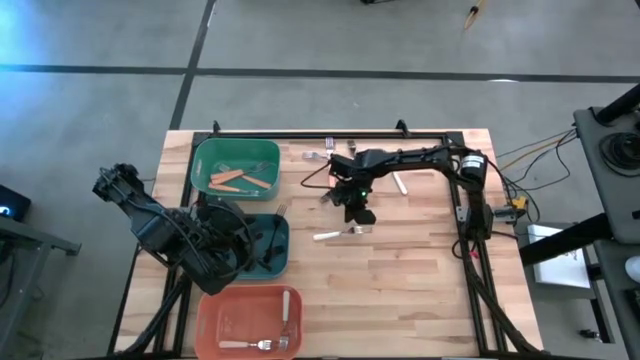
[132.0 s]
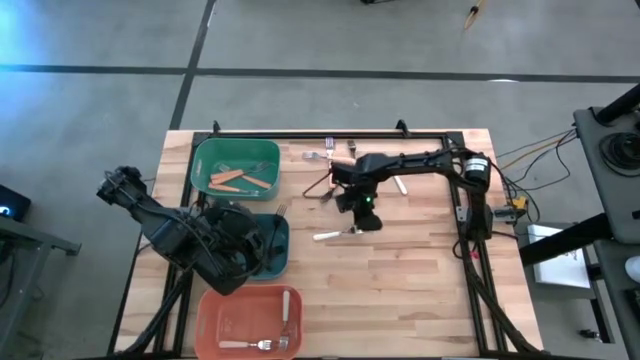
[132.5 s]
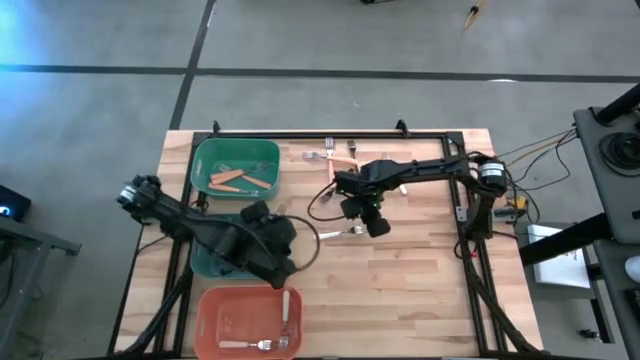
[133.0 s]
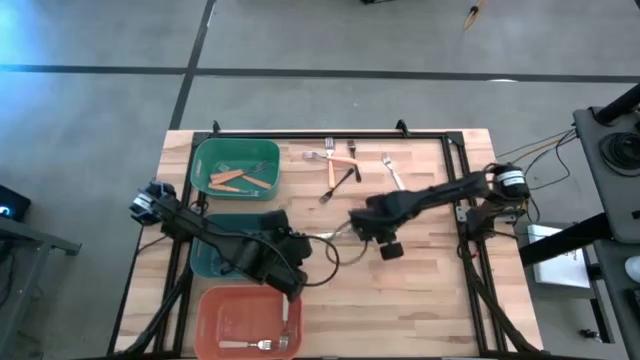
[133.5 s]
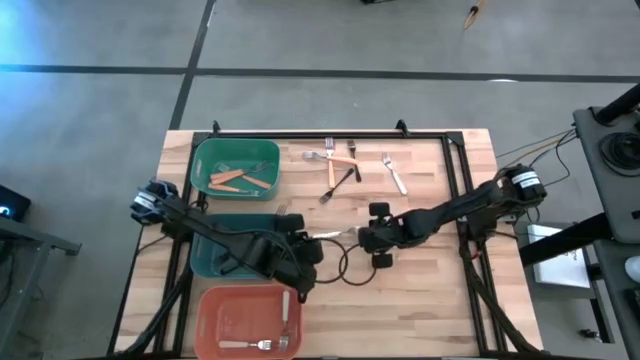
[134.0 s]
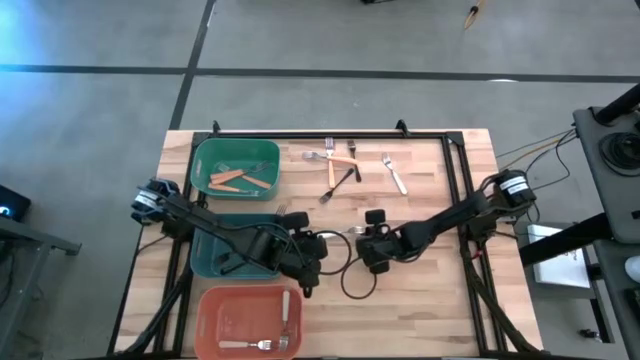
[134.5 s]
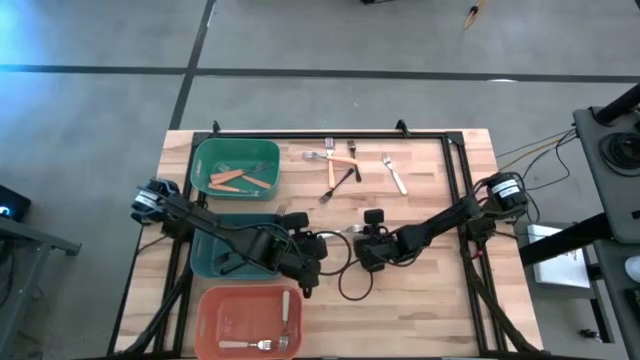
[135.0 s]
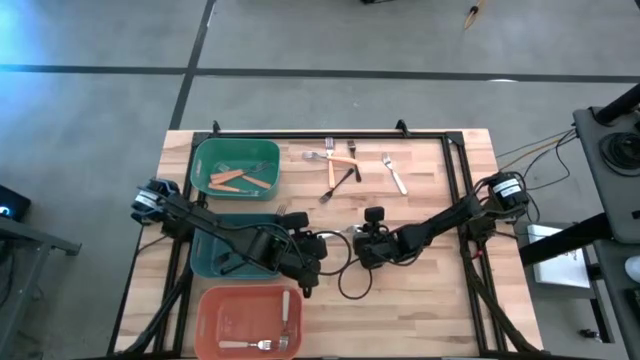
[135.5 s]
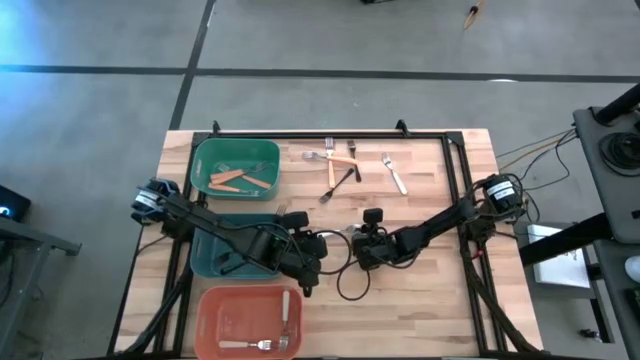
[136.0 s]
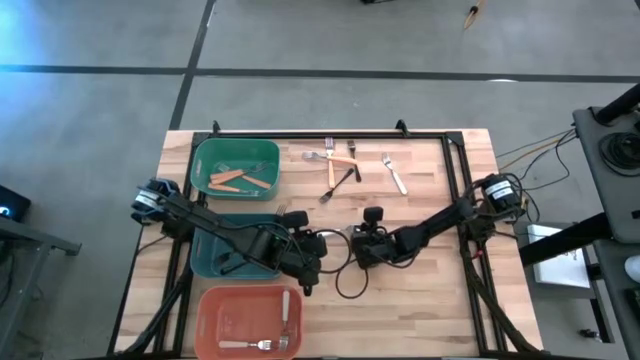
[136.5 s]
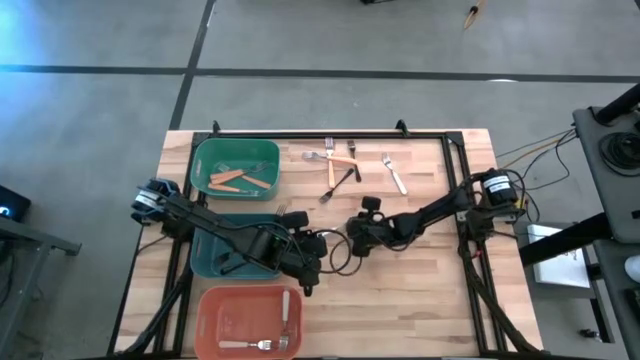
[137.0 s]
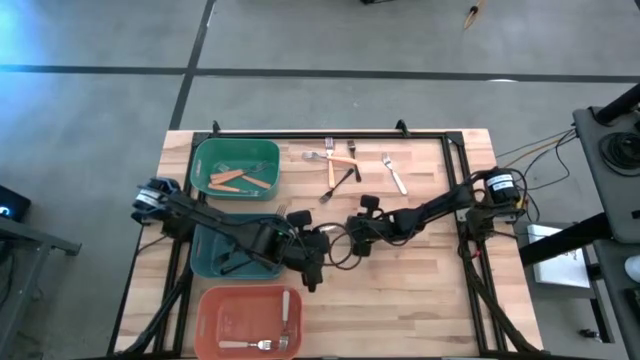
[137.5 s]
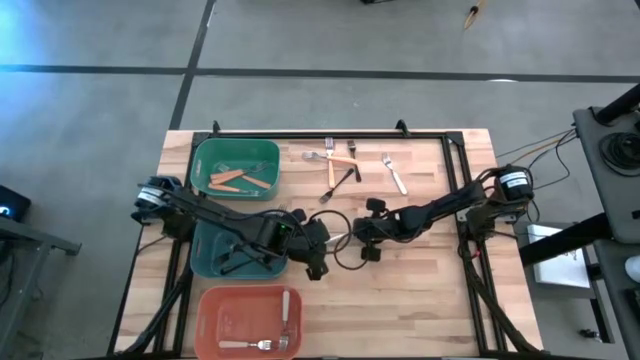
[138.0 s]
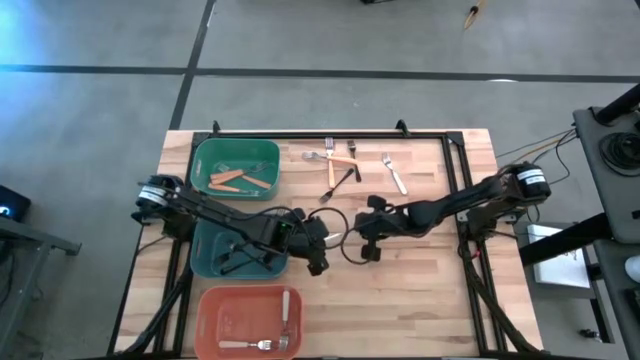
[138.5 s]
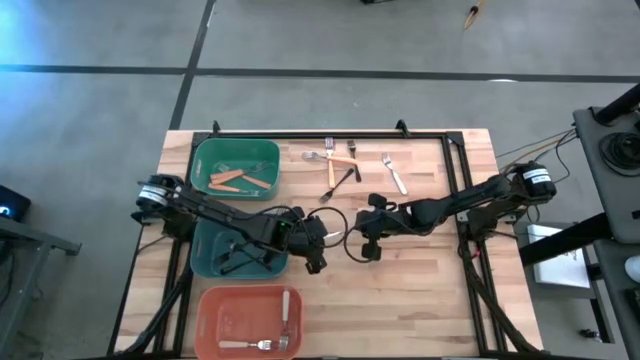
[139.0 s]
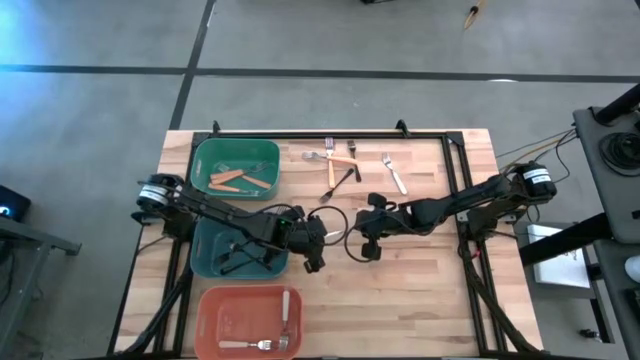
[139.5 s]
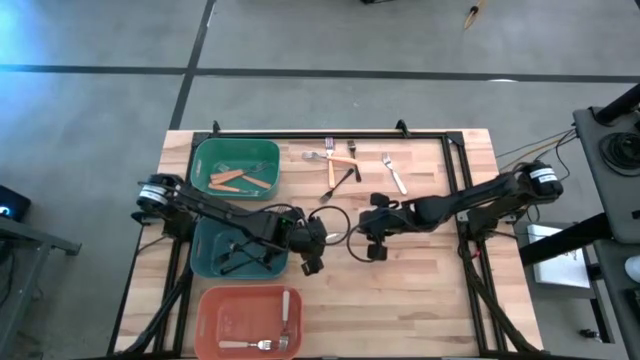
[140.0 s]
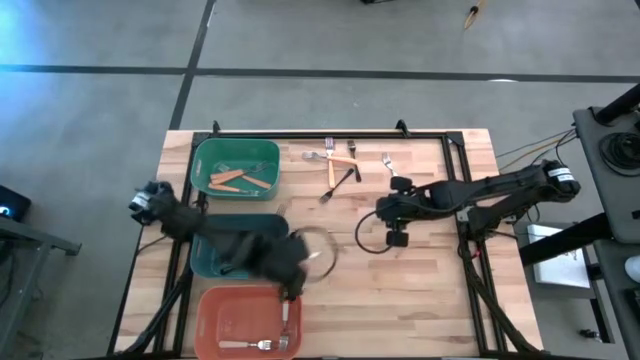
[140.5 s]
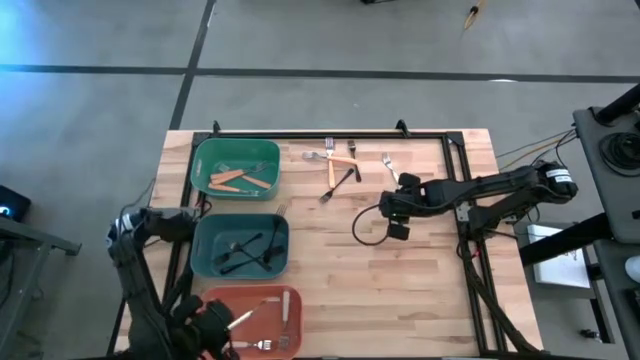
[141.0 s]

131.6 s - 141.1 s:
Task: Sort silverware by color (type)
Put the white fork into the orange bin

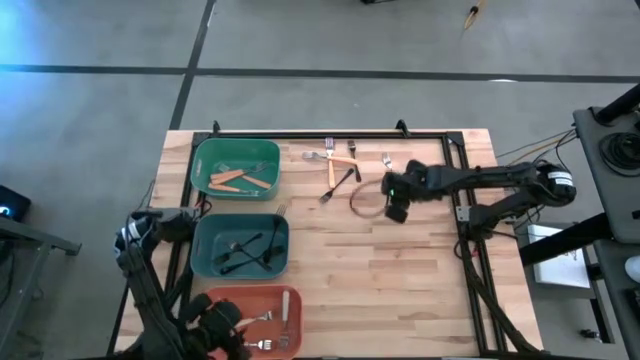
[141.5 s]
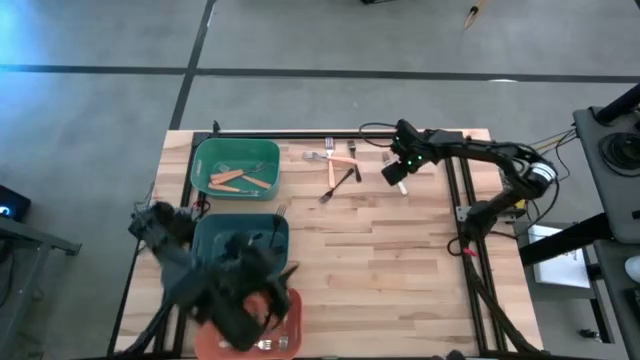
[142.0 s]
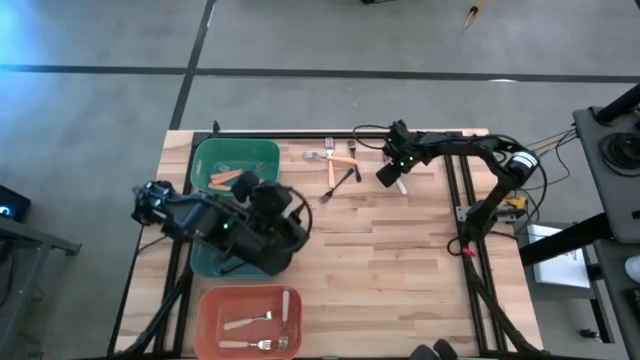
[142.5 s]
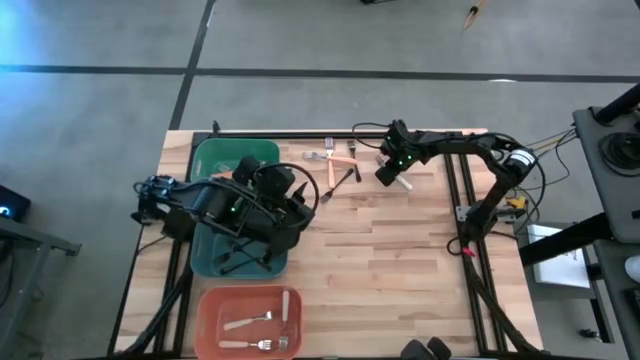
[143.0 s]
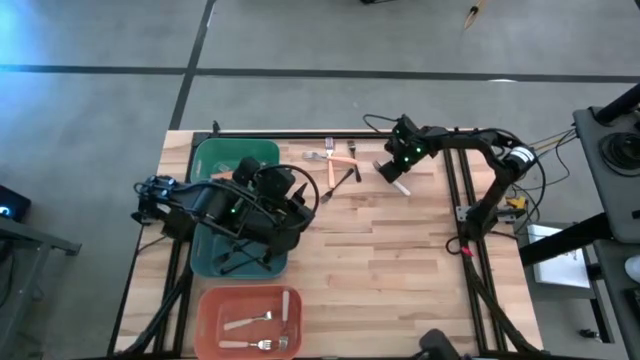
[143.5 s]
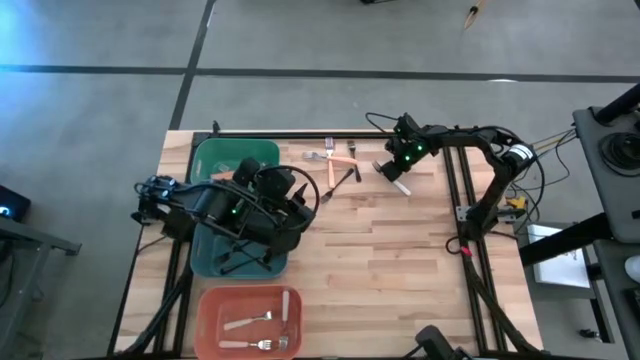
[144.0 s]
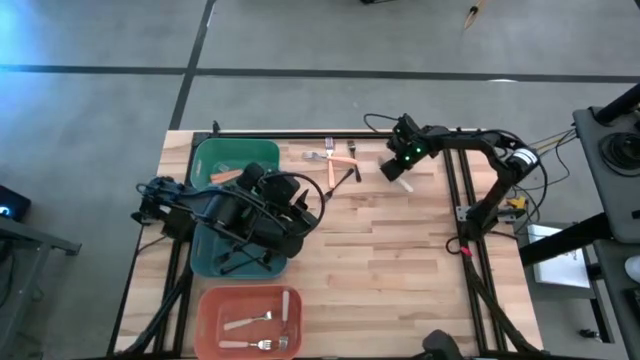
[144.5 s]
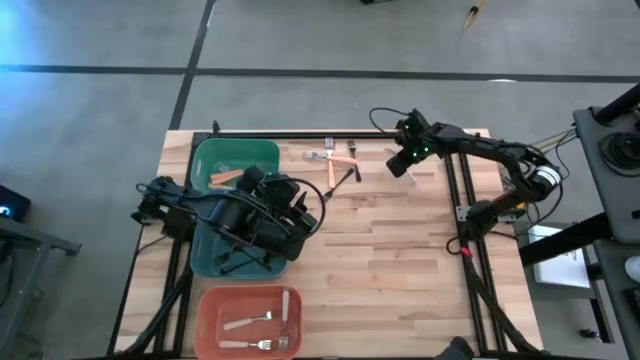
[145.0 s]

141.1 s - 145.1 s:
Put the white fork into the orange bin

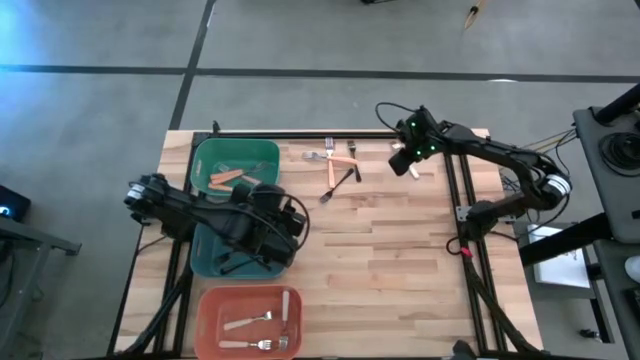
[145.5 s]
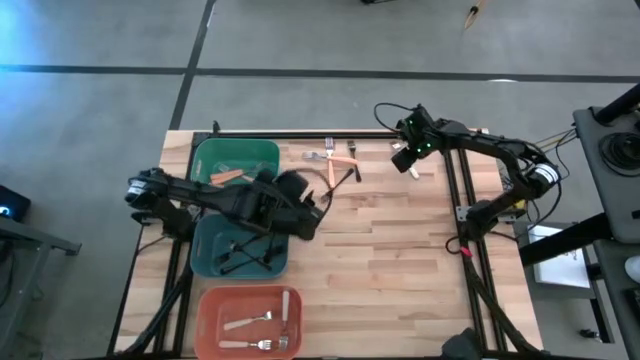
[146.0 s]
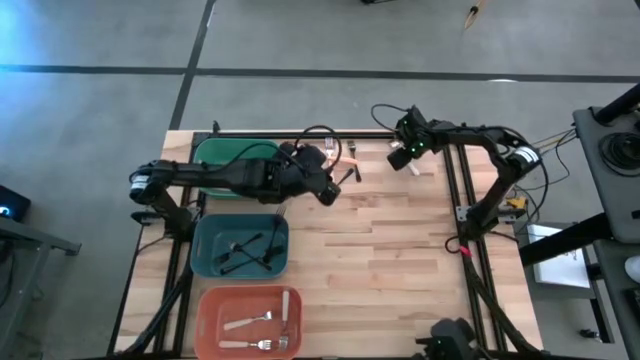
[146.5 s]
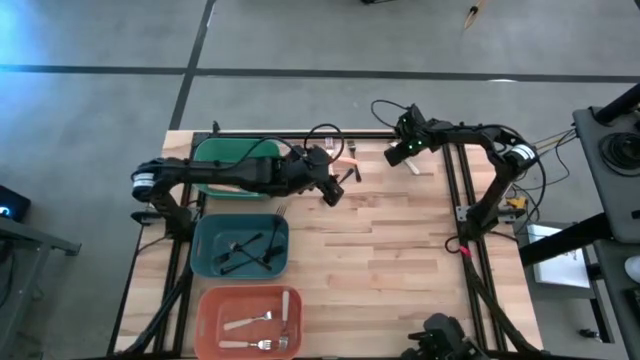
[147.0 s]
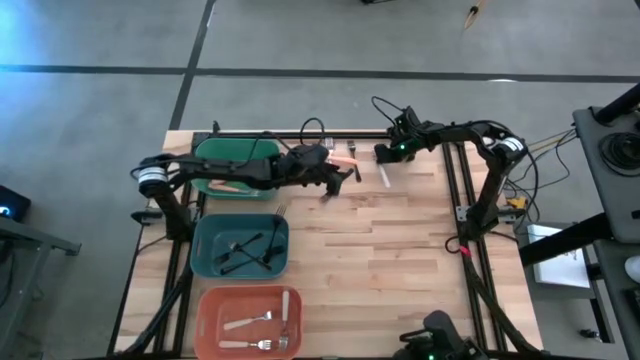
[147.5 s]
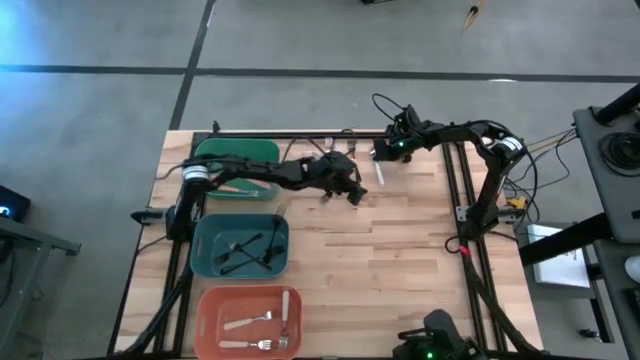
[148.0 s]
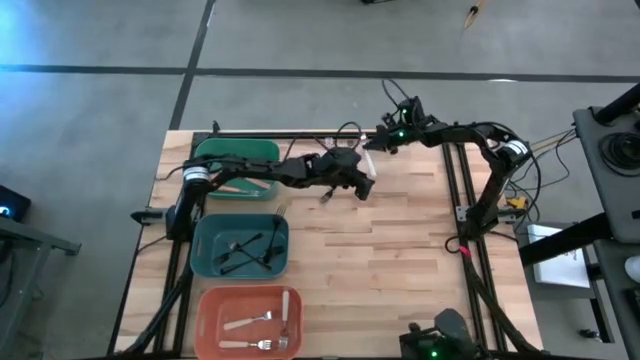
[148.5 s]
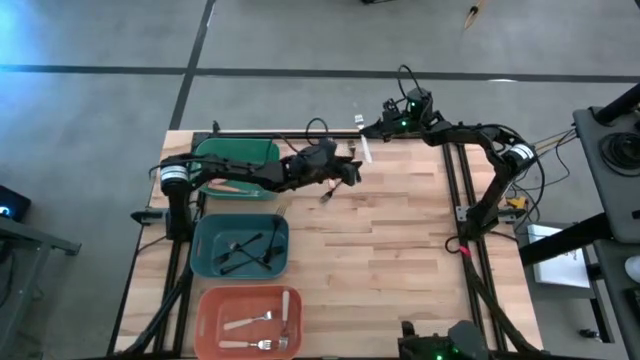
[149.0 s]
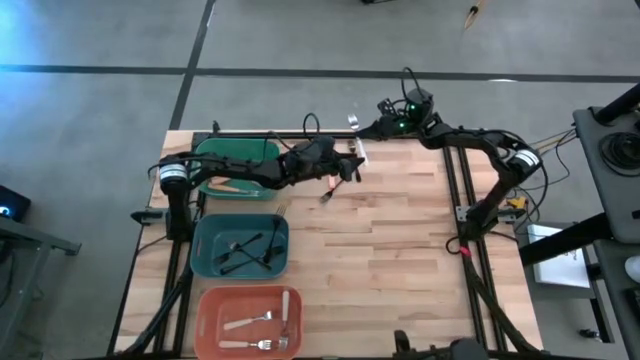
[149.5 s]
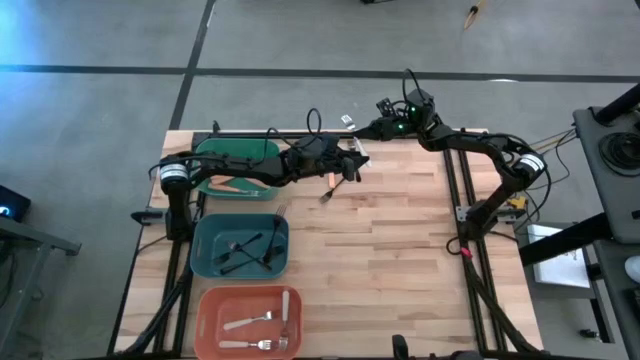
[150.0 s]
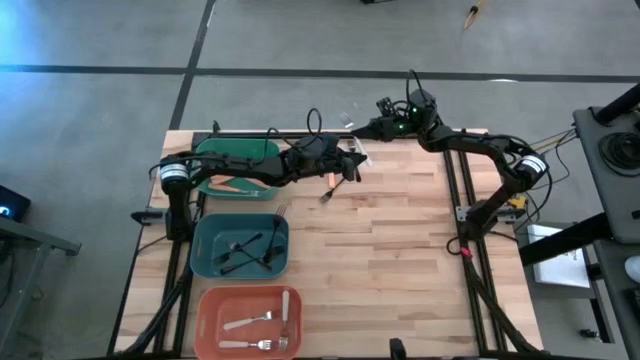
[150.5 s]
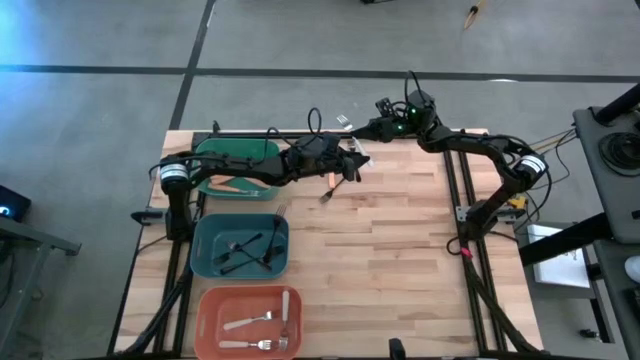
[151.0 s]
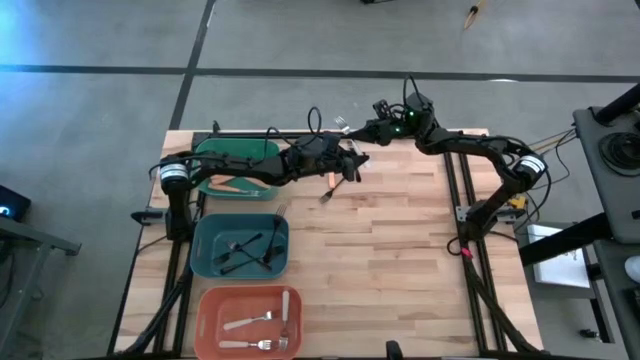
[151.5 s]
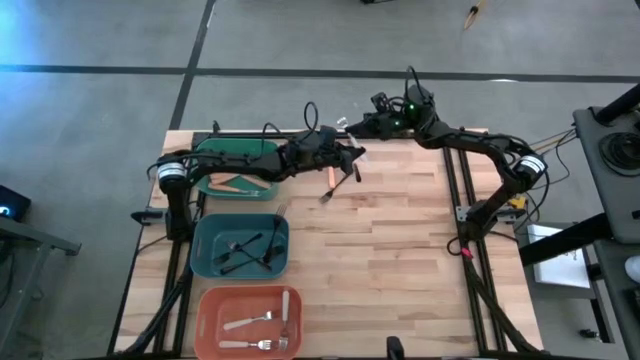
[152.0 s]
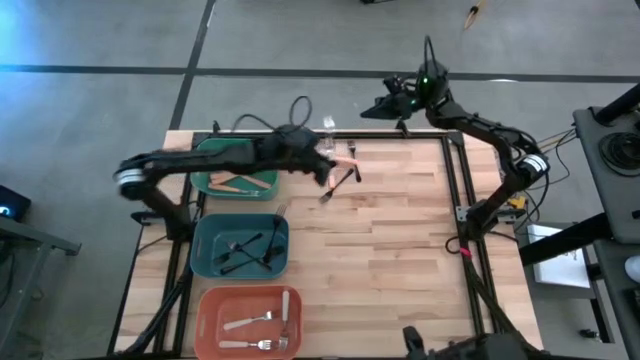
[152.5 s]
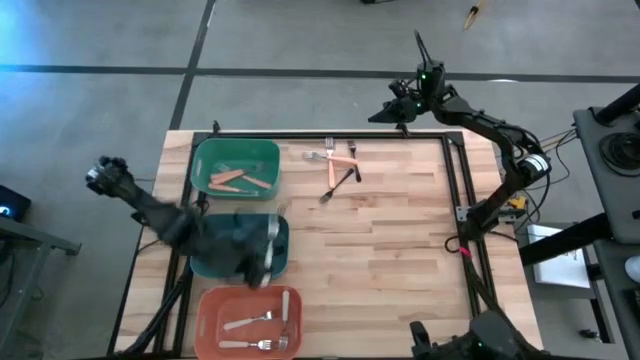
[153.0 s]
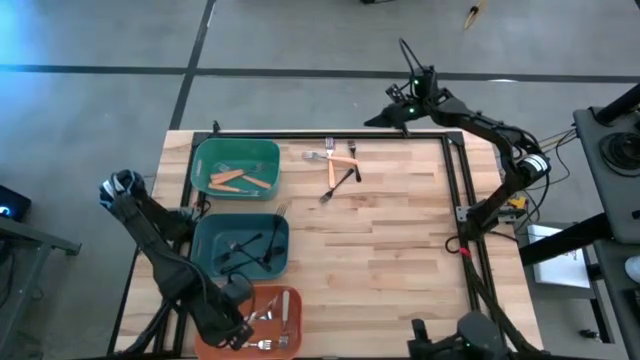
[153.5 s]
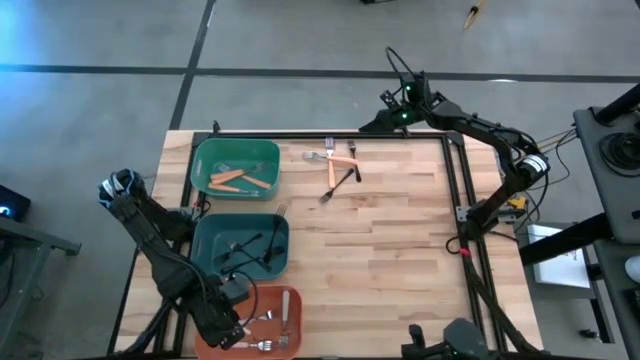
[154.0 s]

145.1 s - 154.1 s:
Put the white fork into the orange bin
